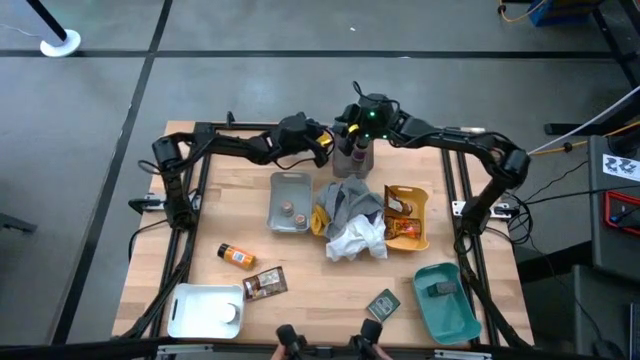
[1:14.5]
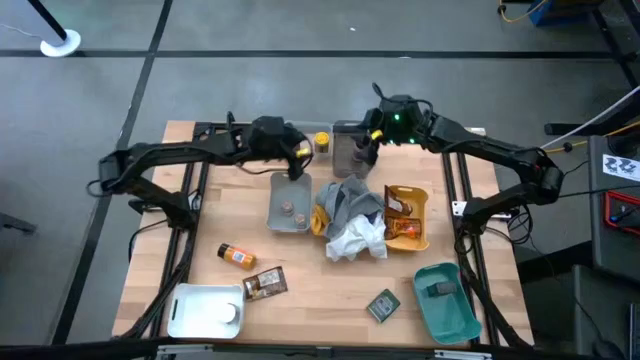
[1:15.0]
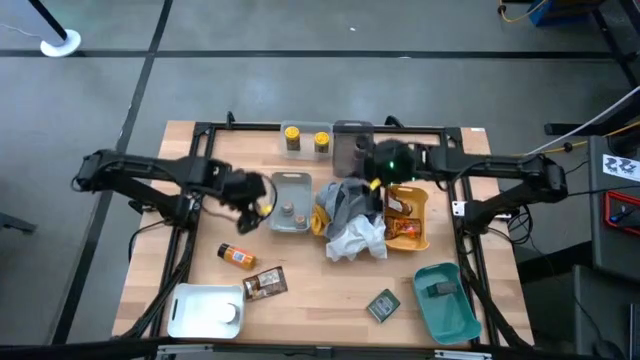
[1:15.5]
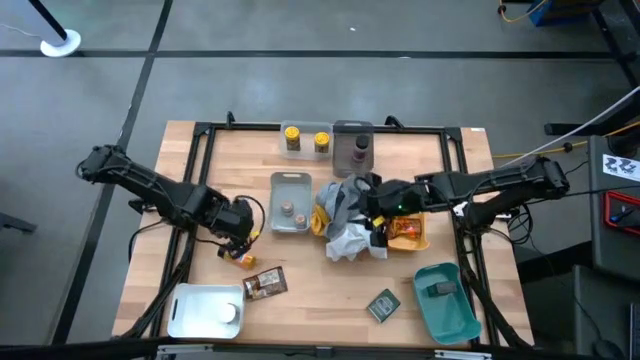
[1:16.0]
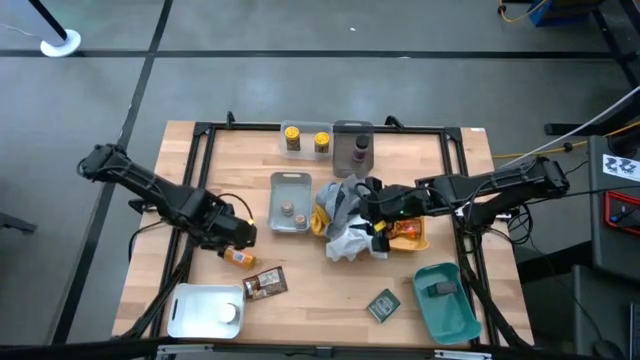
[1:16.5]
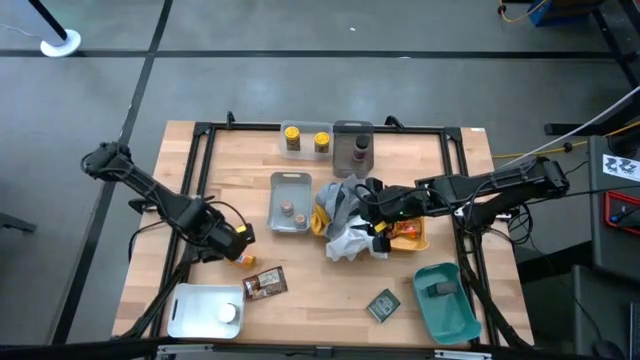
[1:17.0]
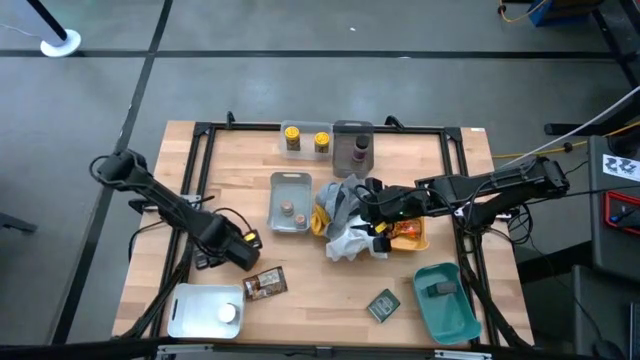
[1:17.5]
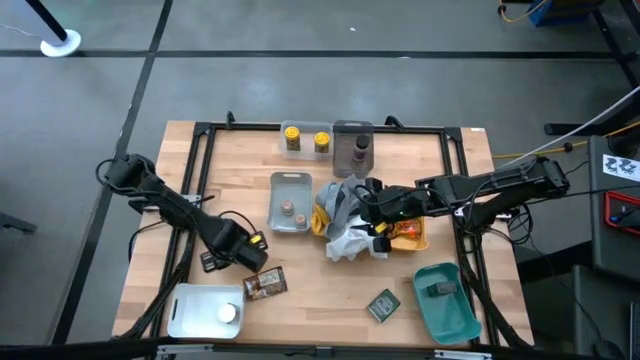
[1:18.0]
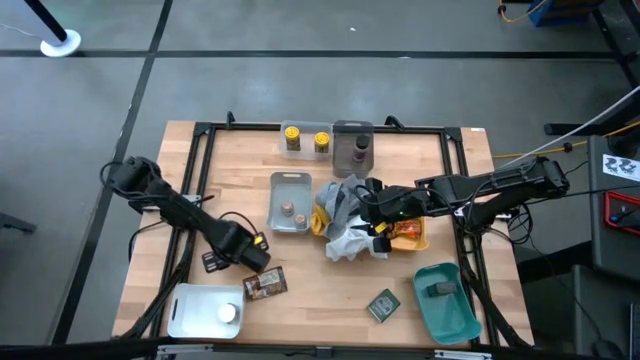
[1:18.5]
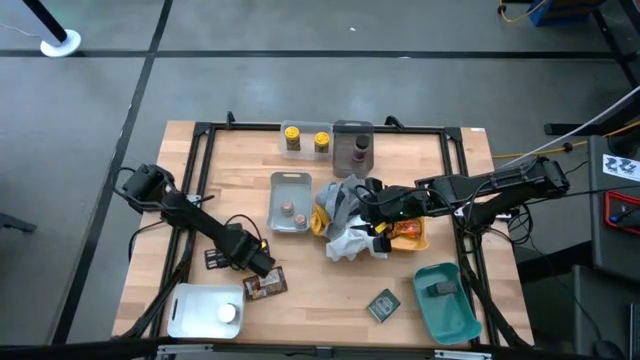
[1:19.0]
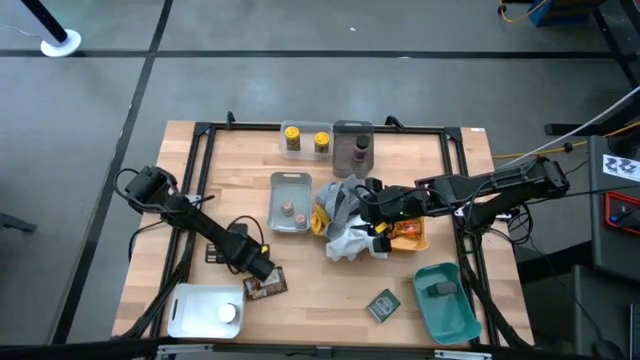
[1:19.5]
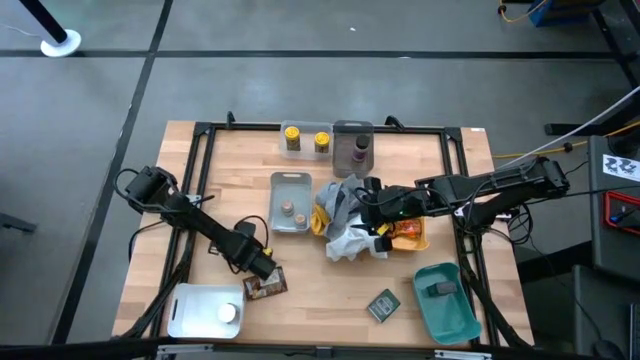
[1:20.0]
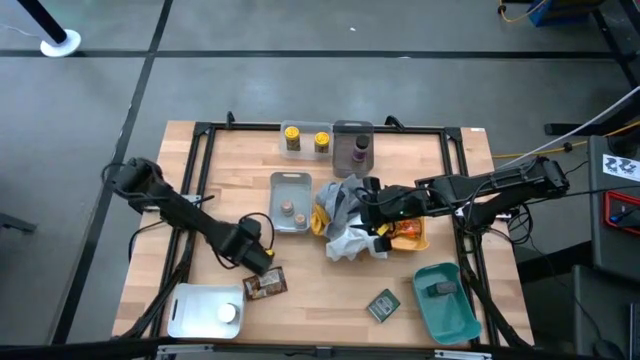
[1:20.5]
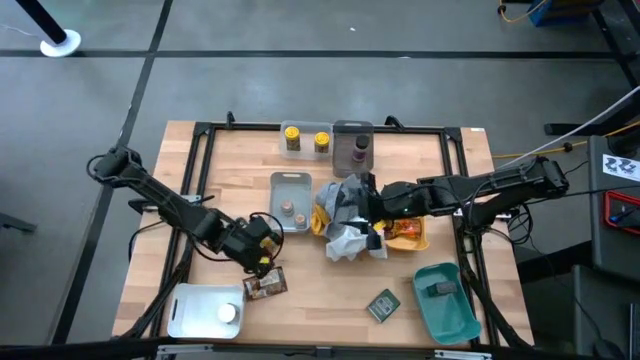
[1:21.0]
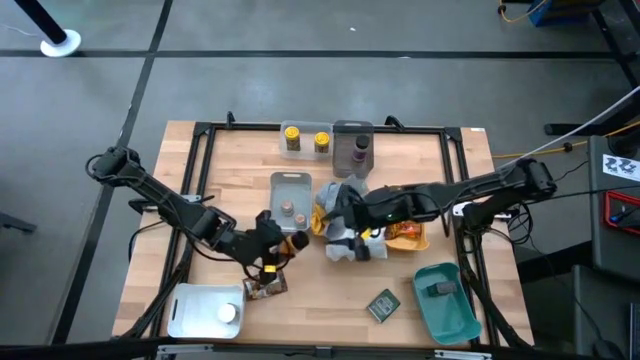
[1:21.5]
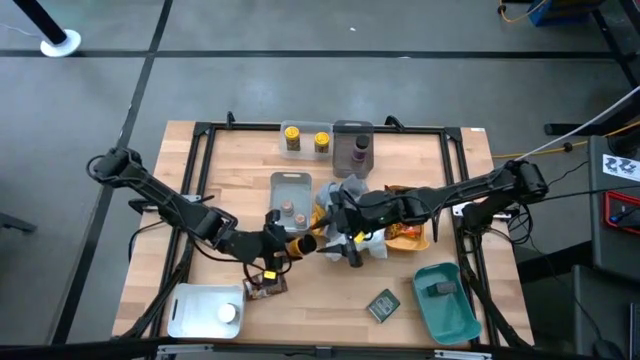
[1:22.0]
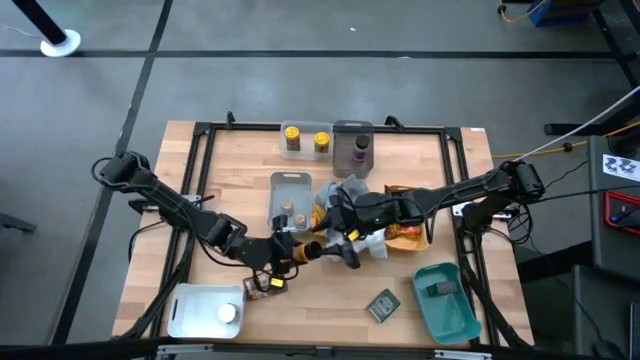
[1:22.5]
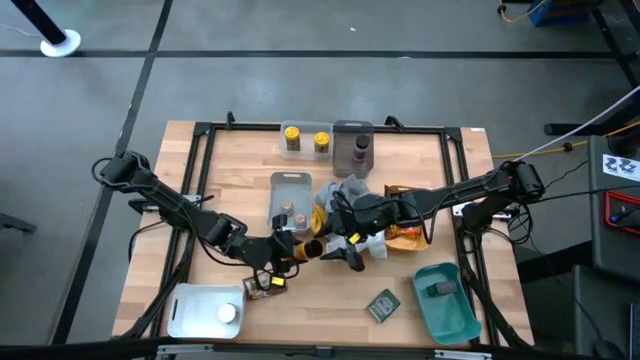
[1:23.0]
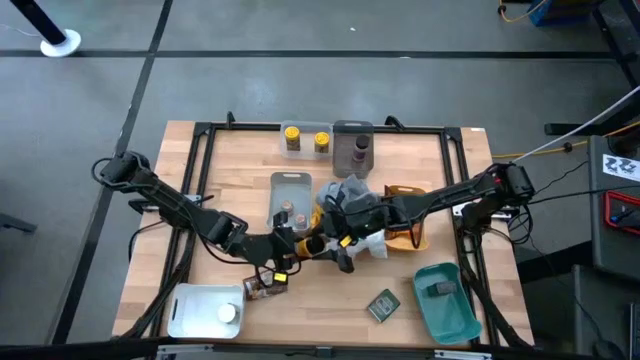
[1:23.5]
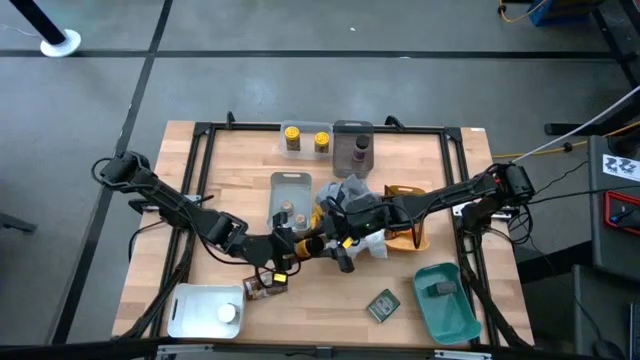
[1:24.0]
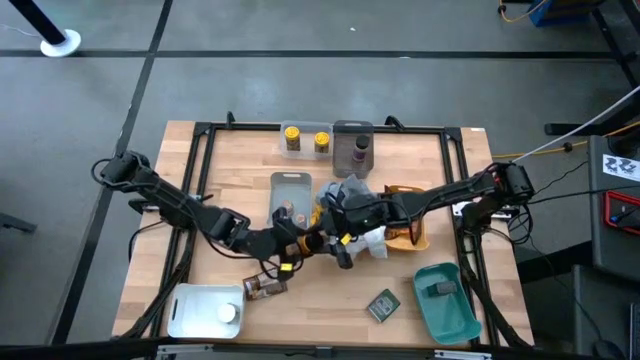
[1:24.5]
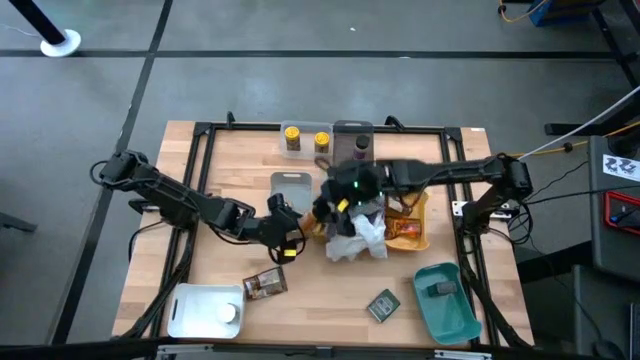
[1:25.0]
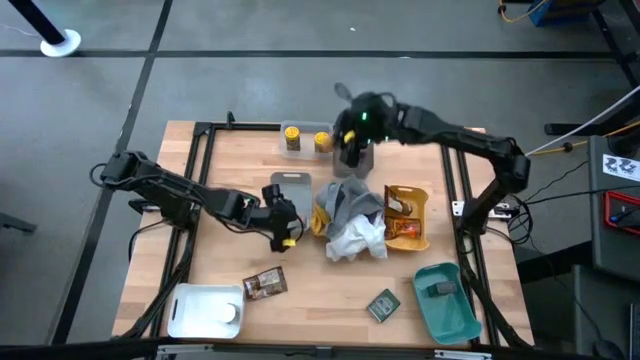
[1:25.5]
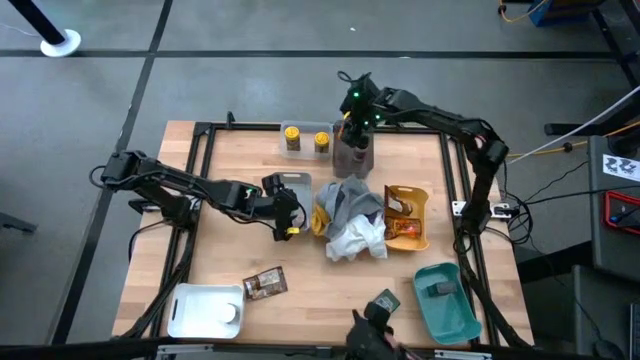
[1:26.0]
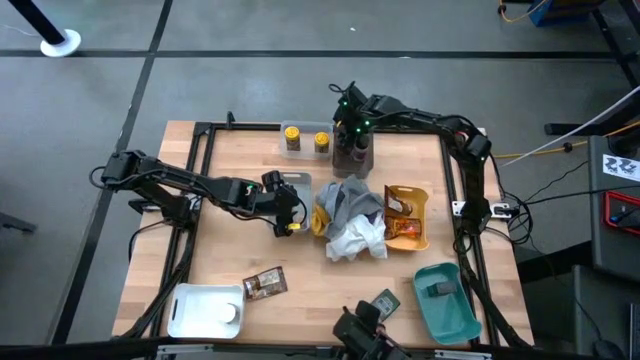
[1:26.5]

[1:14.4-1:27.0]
Task: Sort spices by type
Put the black seasoning bottle into the black bin

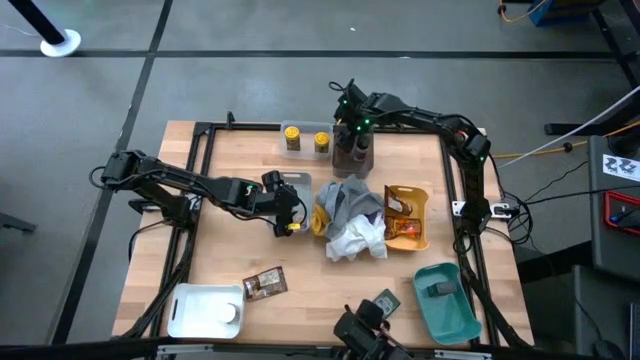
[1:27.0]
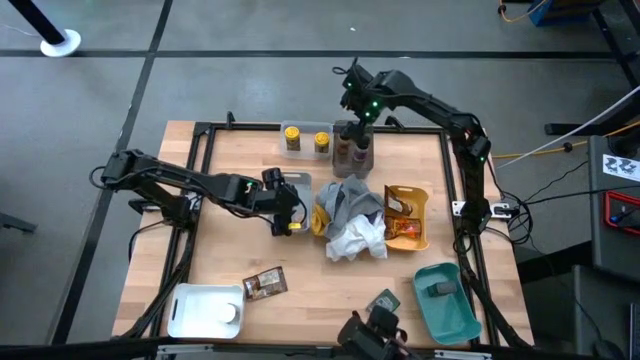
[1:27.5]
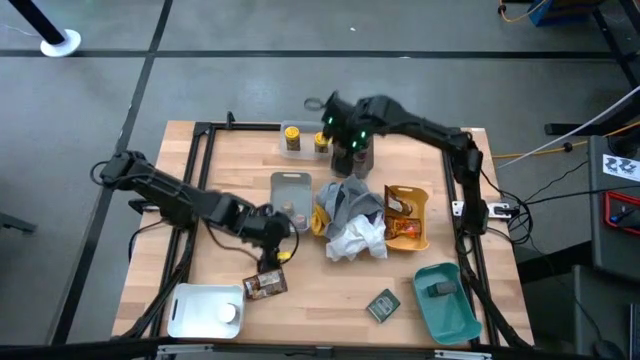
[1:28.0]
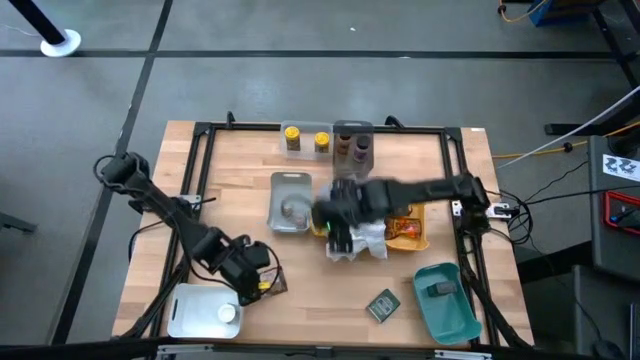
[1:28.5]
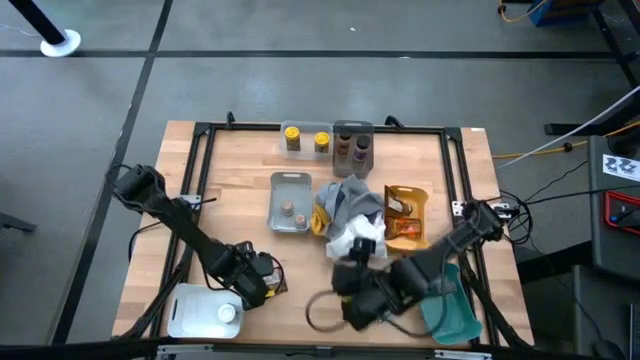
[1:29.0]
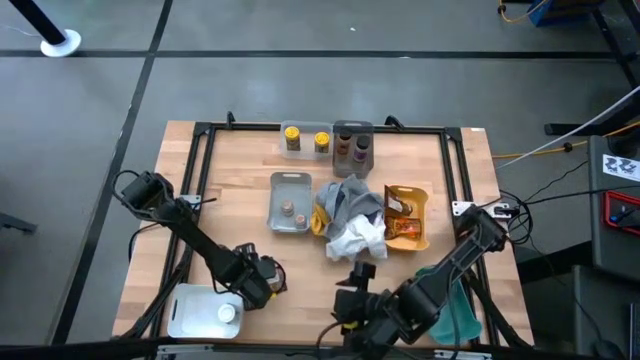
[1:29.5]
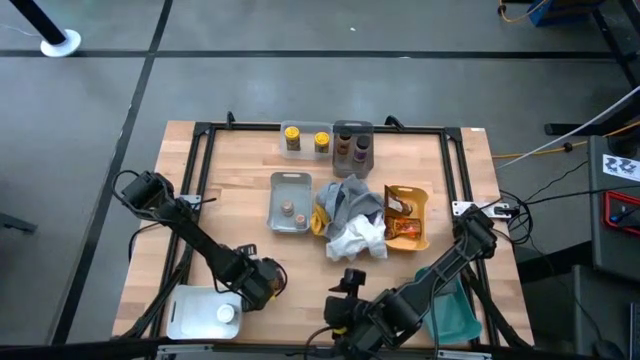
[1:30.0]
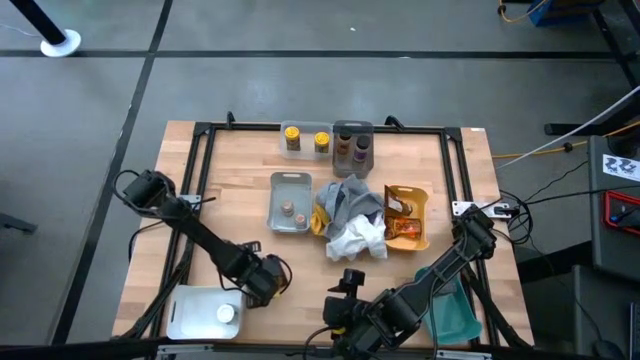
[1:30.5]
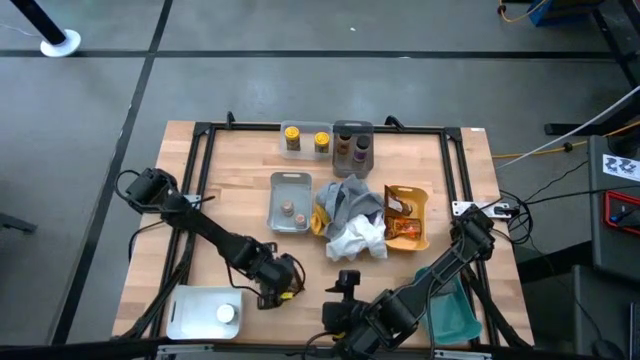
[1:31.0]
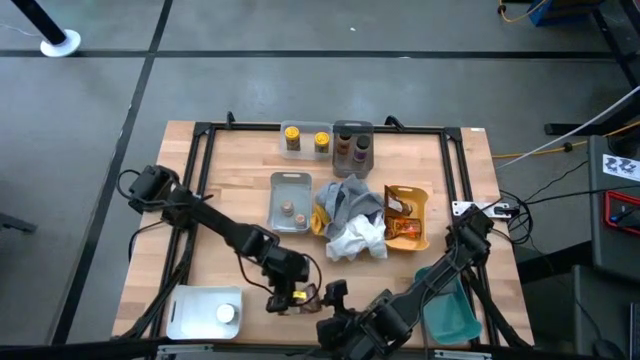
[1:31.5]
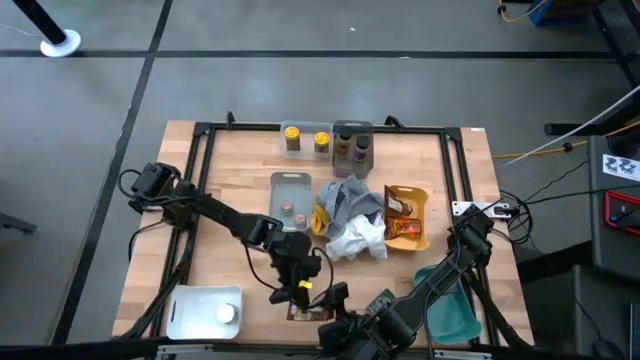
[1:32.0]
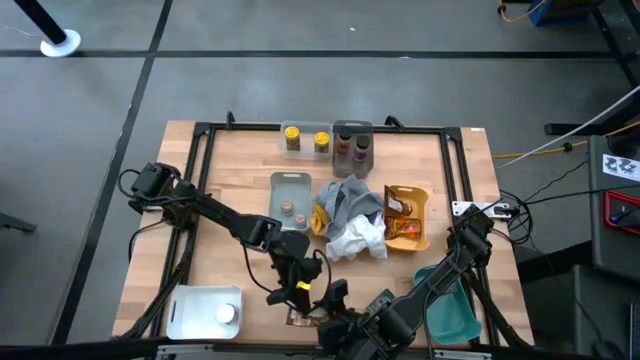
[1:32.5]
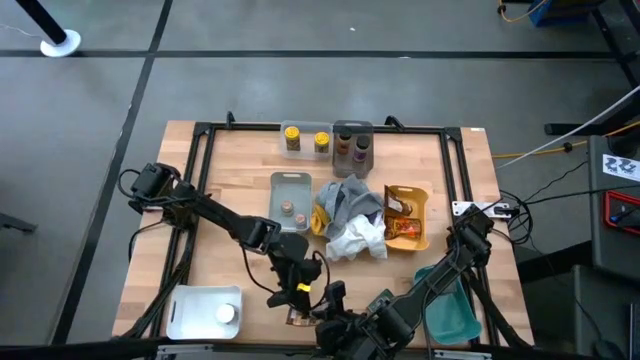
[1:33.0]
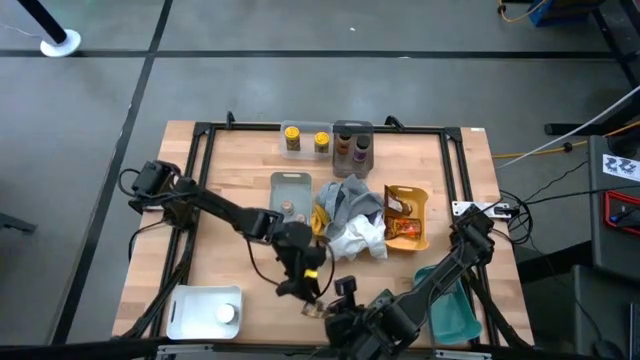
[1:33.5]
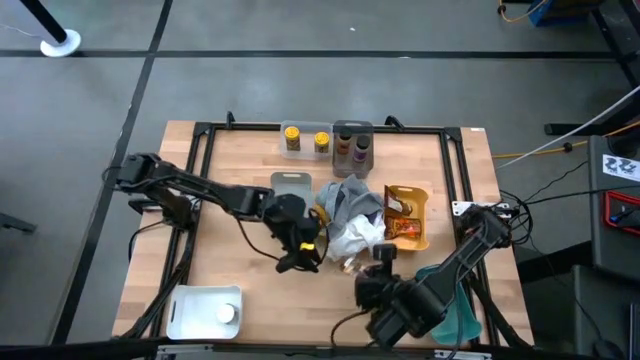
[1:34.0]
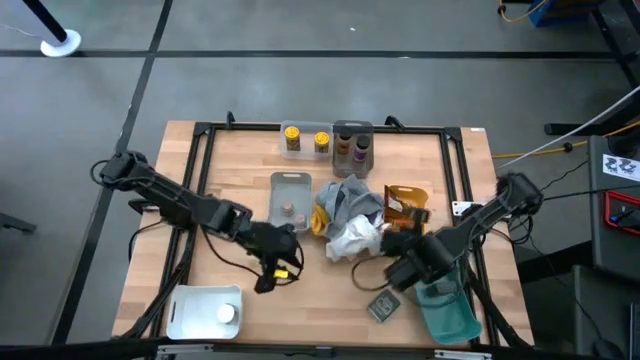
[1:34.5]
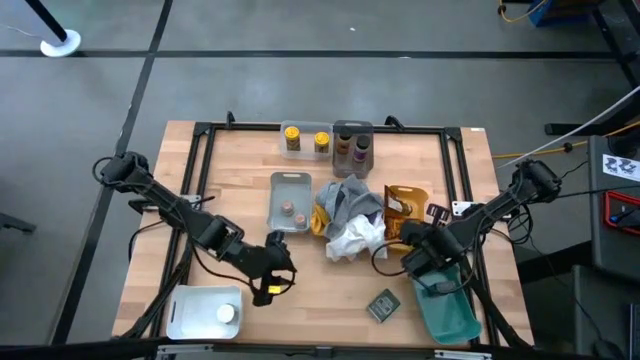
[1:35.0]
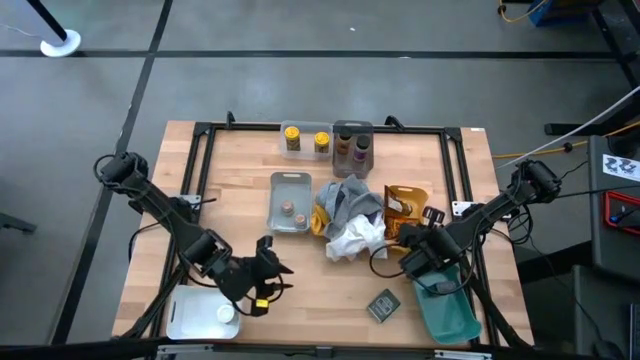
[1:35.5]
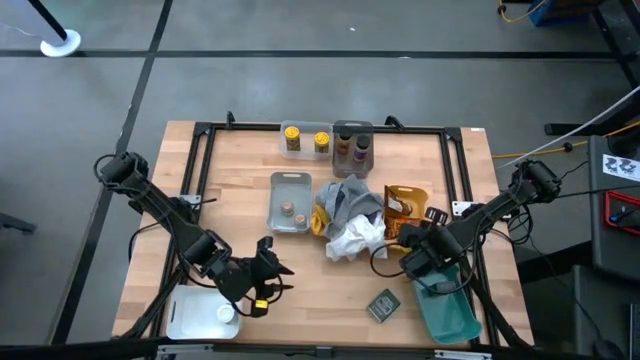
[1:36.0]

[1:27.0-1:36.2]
Put the orange seasoning pack into the yellow bin
